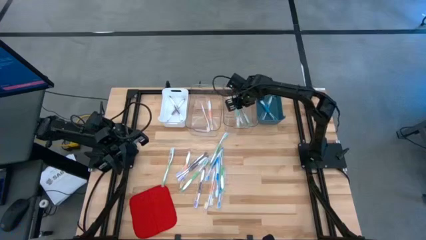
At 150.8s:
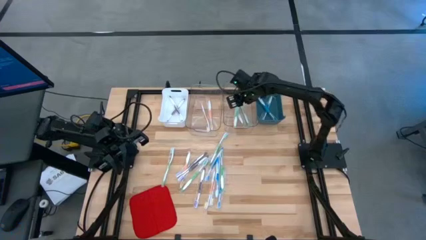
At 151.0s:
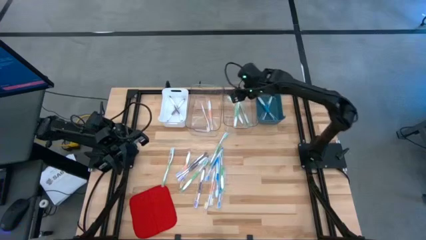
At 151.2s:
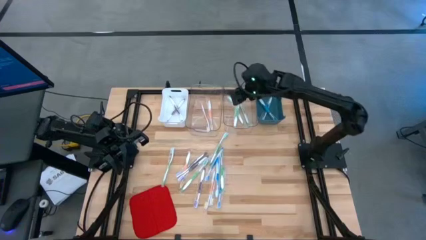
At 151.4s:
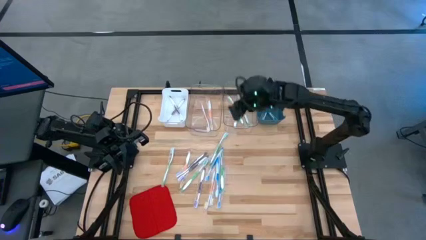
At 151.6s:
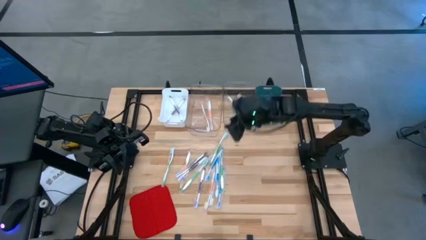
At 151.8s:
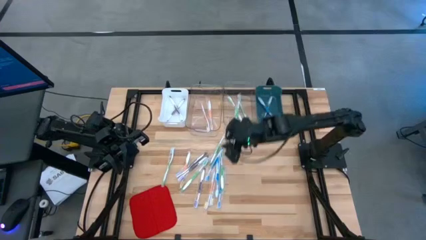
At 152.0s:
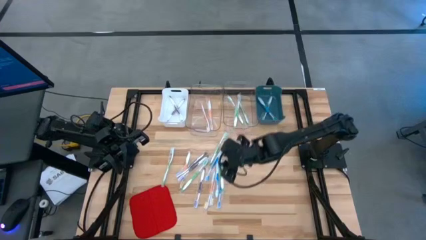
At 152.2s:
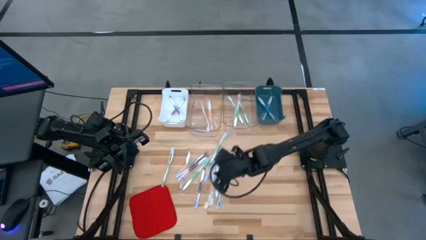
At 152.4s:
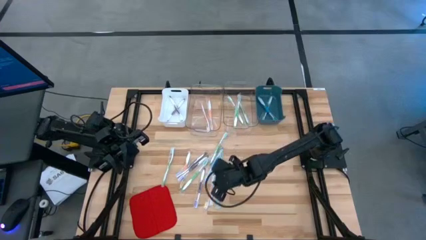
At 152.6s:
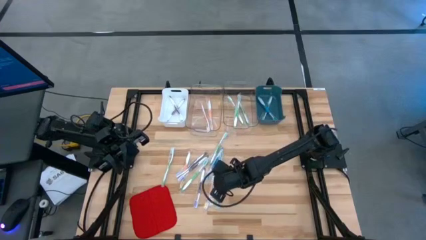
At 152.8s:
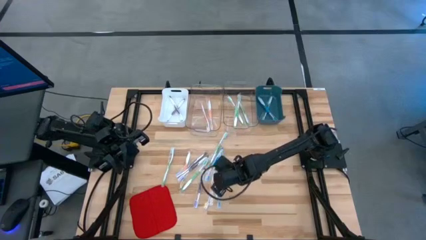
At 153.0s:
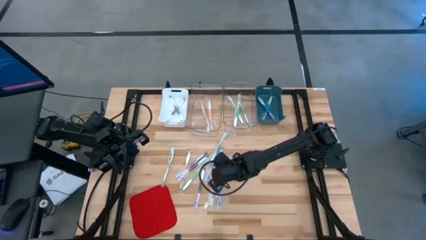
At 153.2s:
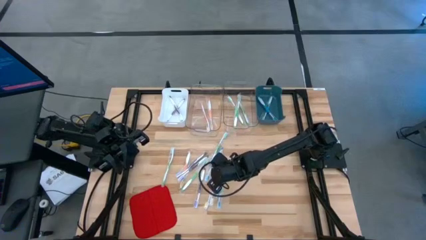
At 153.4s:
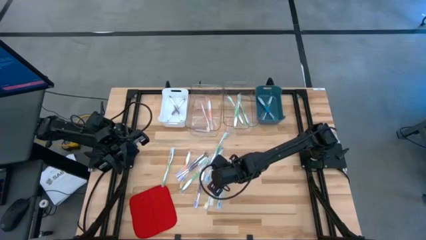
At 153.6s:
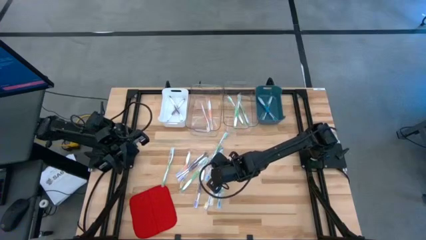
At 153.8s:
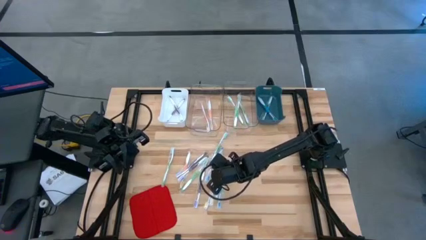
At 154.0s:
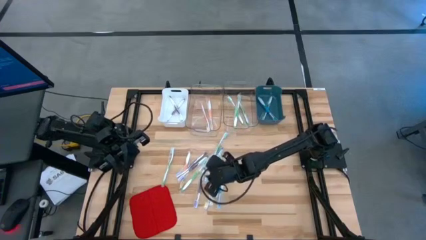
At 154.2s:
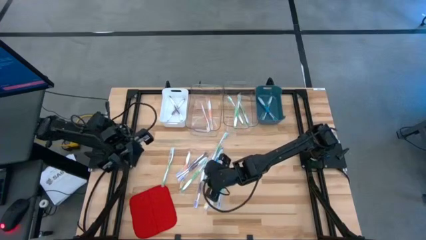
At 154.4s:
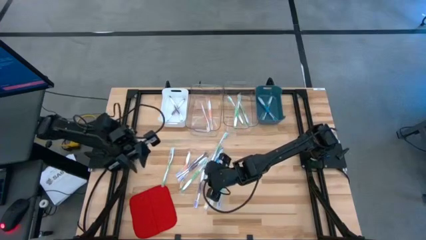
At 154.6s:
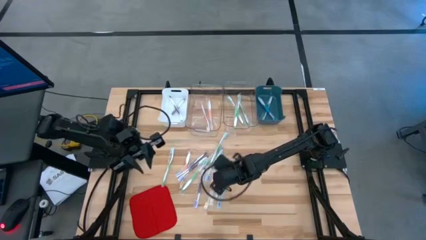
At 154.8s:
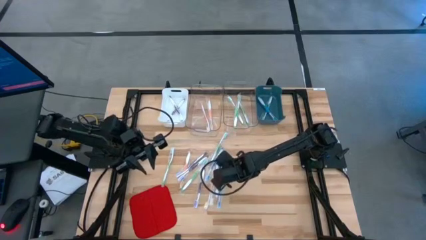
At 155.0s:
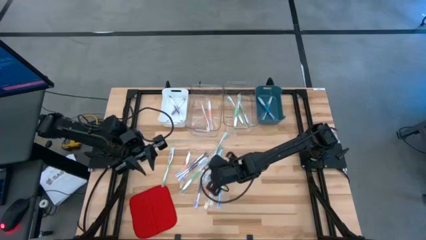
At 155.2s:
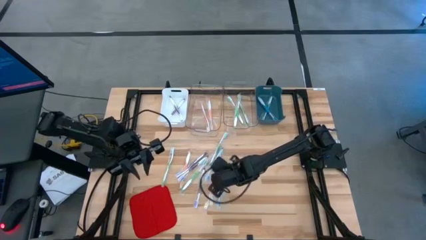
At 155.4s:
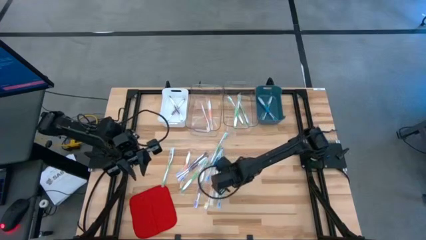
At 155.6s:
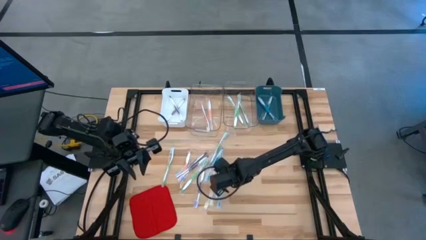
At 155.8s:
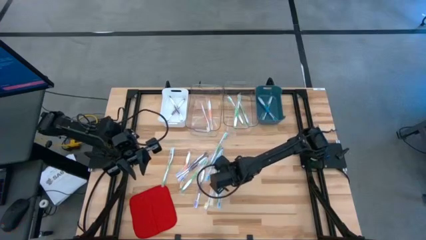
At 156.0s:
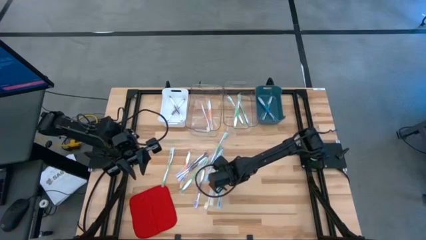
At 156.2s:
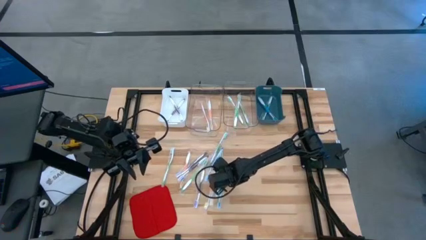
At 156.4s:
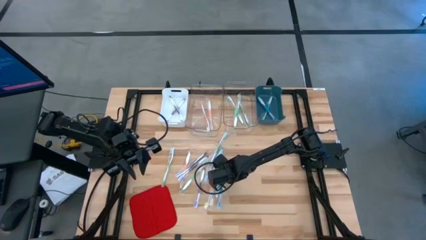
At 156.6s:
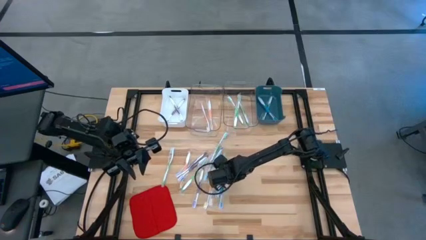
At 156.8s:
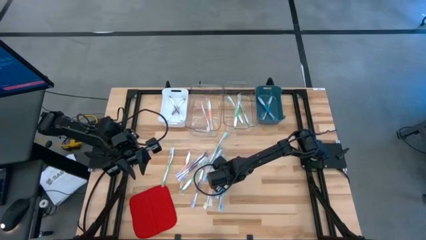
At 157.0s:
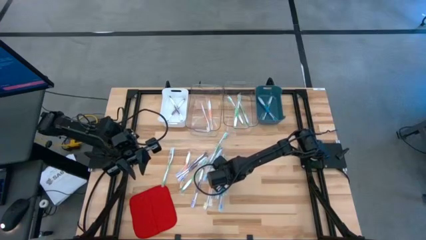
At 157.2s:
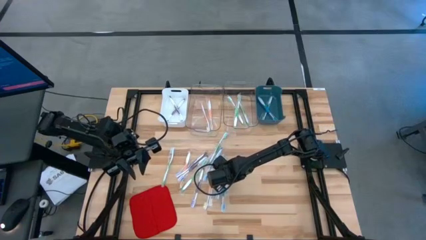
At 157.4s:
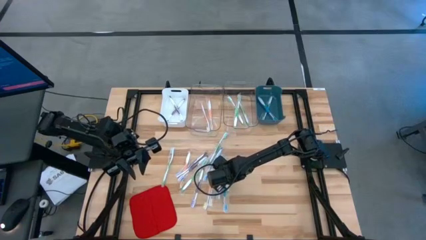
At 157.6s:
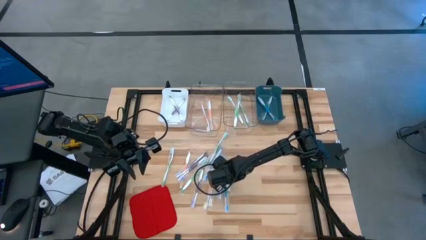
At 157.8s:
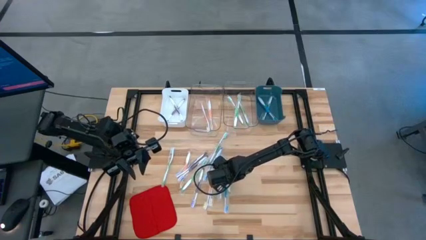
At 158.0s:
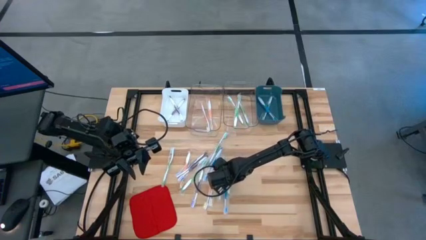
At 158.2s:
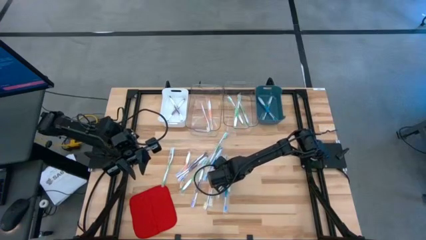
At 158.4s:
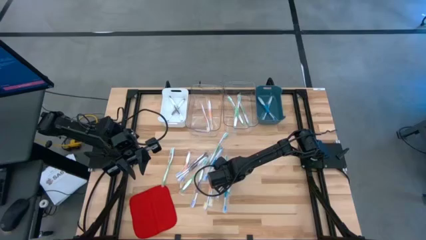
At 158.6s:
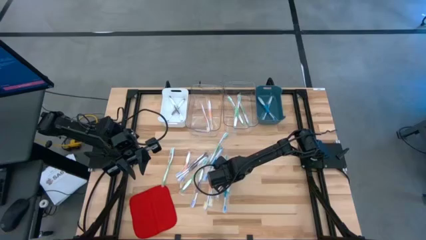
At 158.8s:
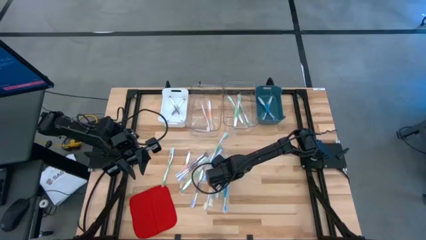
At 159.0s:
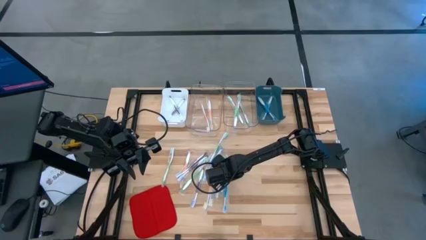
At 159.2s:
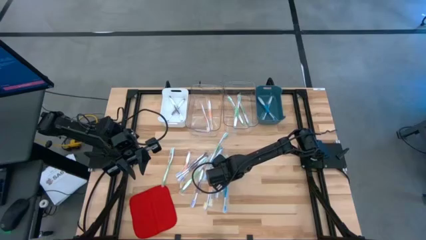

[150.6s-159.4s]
Task: Pick & Place Toothbrushes
Put the green toothbrush into the right transparent bin

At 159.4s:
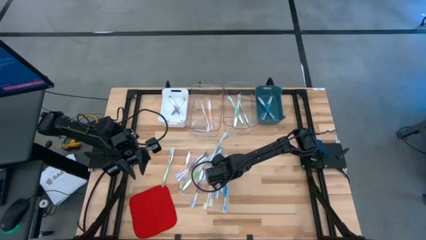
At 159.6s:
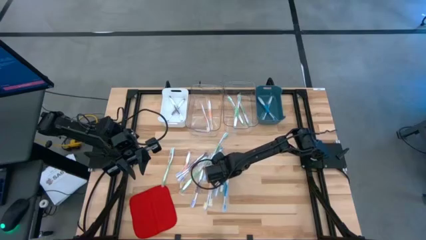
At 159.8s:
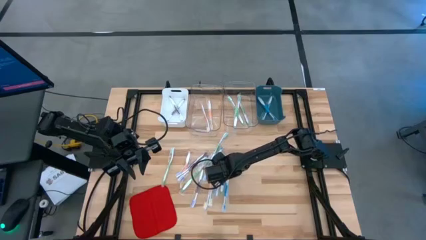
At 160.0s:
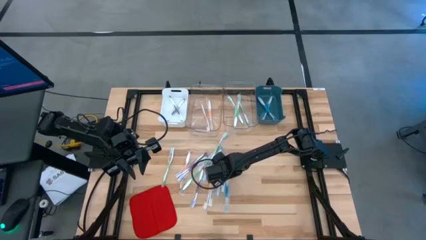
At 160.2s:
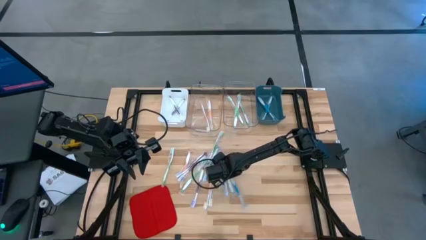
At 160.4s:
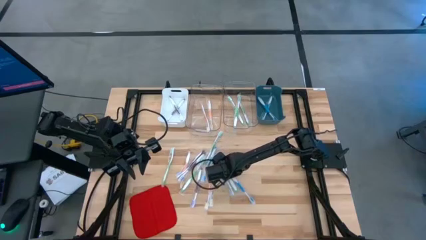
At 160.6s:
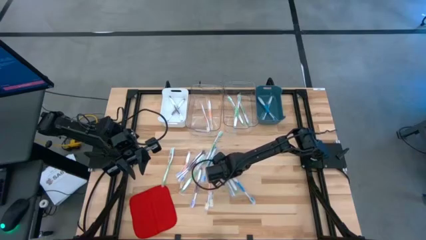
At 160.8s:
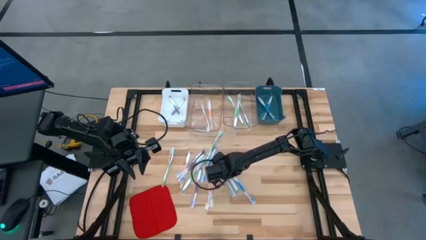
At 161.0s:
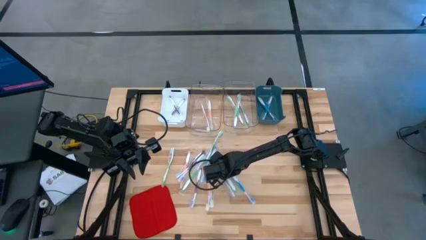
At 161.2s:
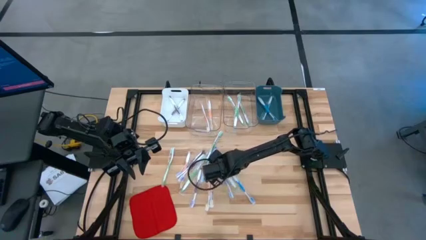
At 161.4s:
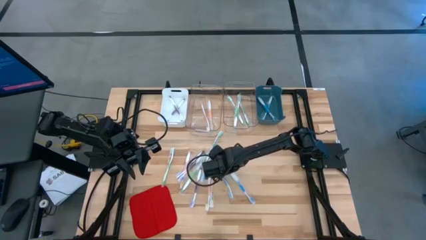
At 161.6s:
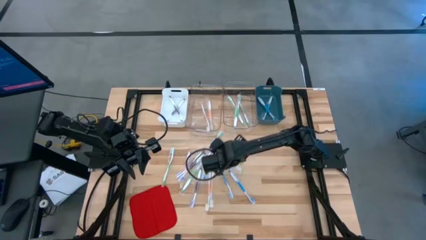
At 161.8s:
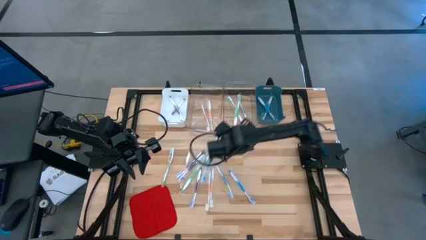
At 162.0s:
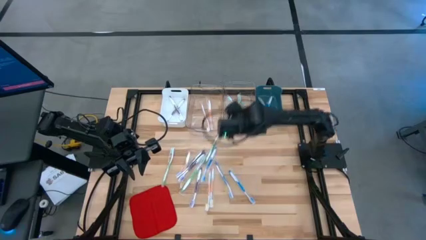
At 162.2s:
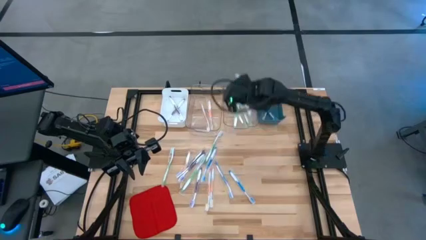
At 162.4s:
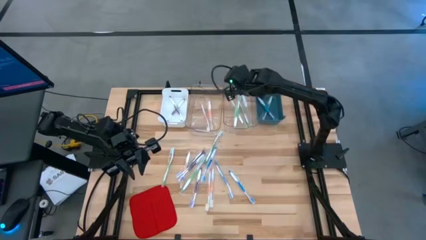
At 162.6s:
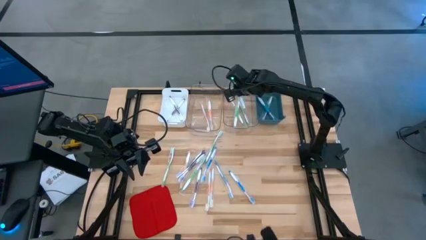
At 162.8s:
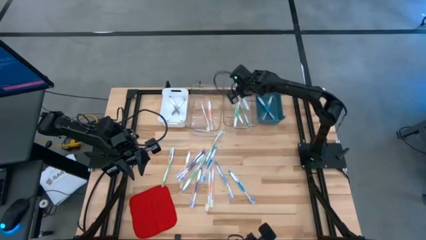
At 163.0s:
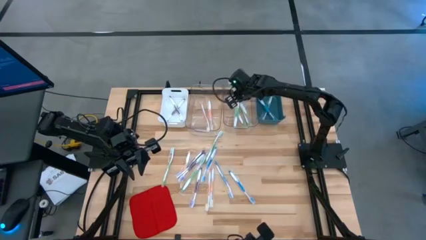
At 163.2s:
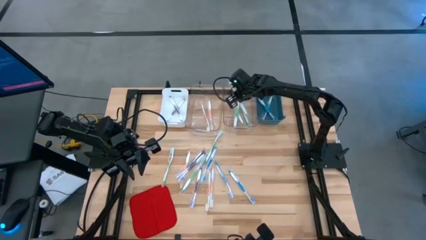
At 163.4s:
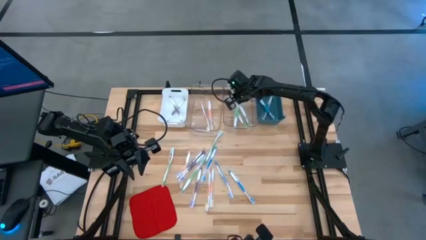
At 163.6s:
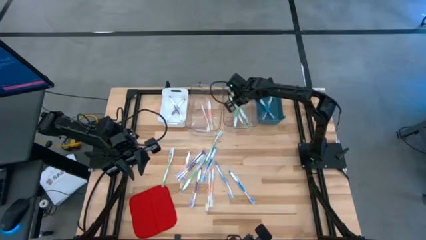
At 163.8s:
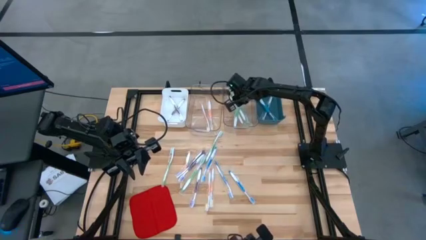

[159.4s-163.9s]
Put the green toothbrush into the right transparent bin
